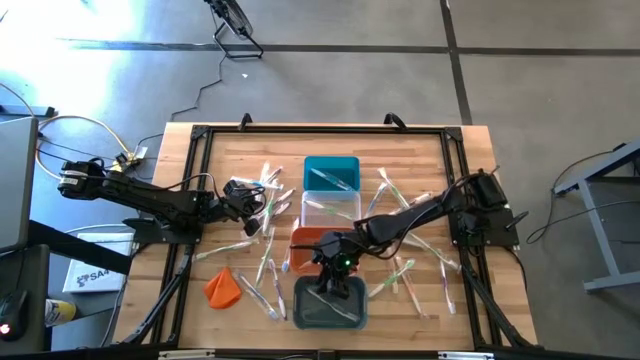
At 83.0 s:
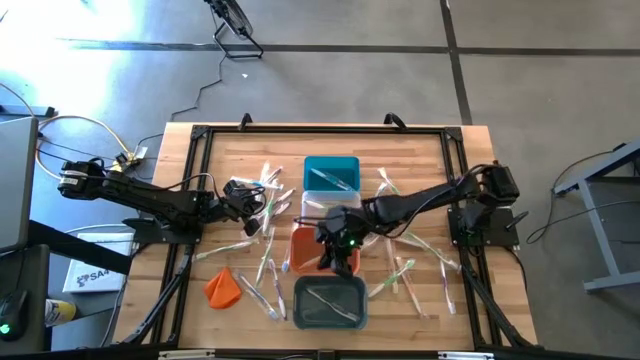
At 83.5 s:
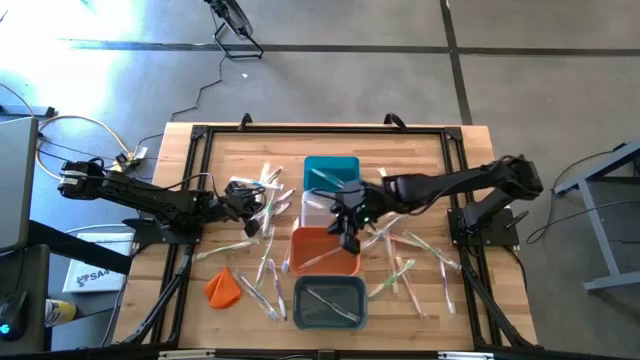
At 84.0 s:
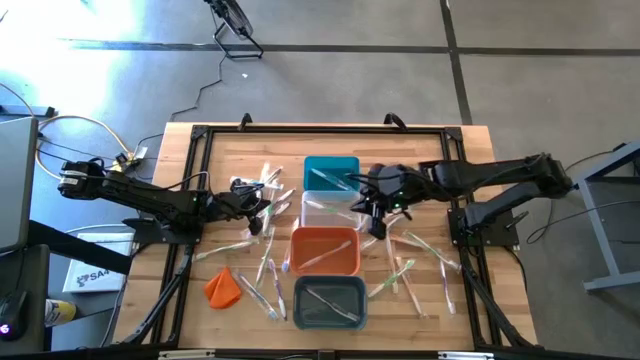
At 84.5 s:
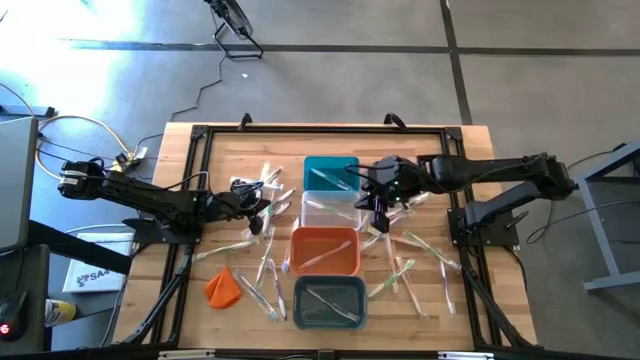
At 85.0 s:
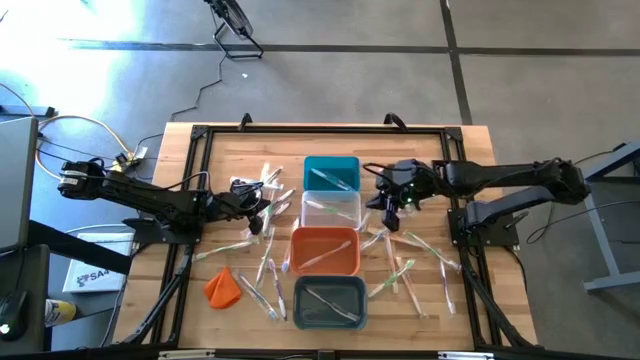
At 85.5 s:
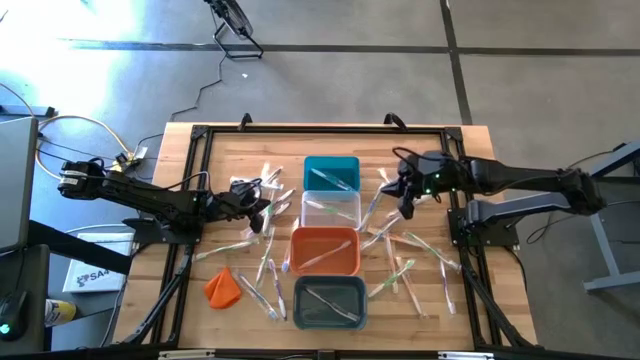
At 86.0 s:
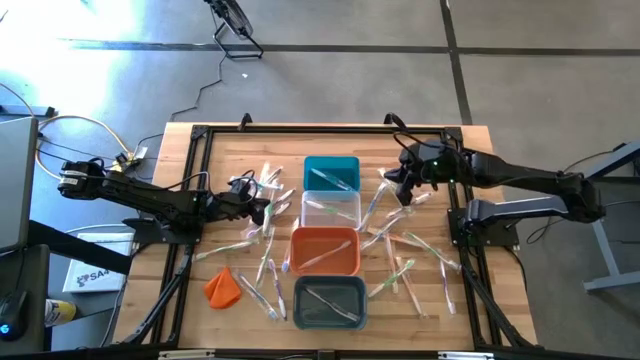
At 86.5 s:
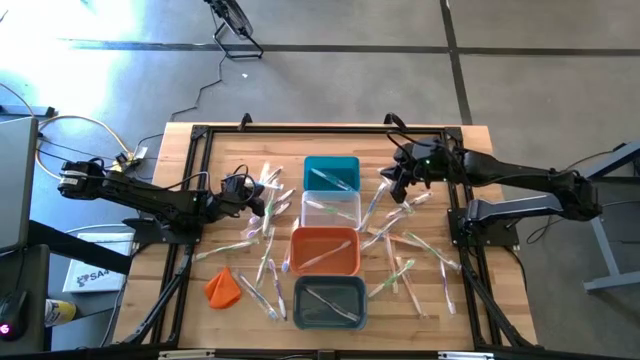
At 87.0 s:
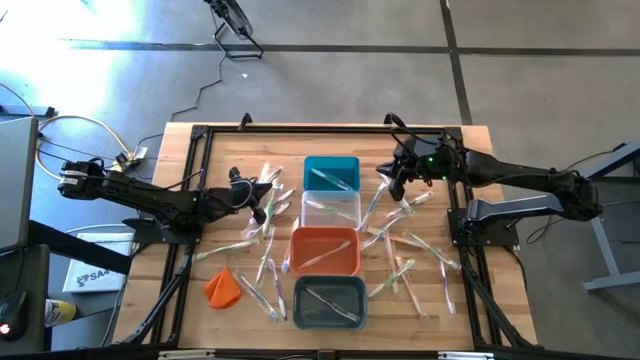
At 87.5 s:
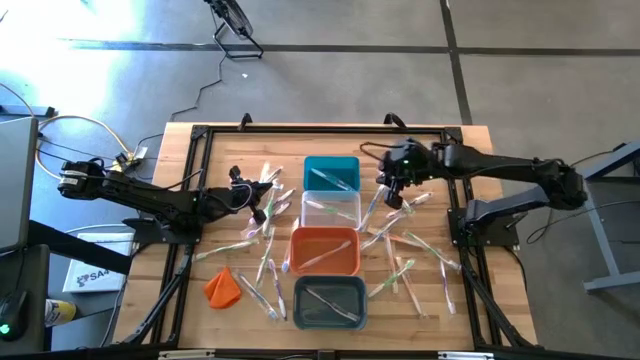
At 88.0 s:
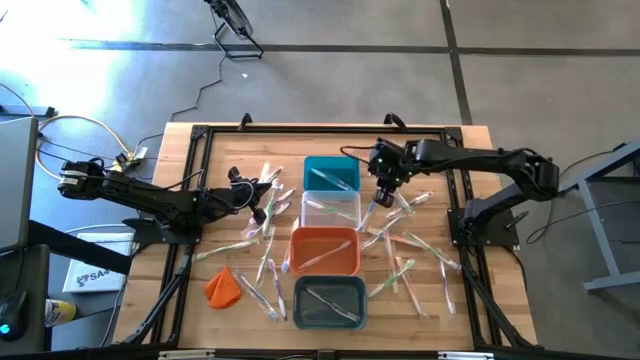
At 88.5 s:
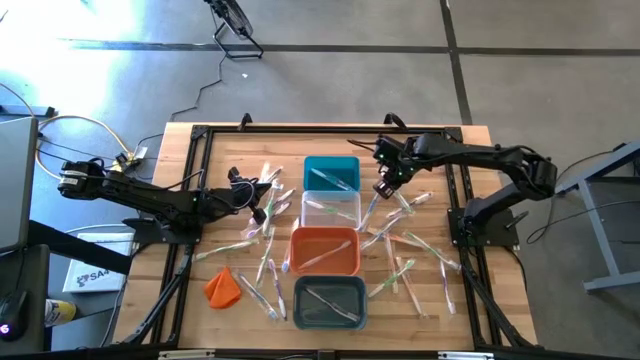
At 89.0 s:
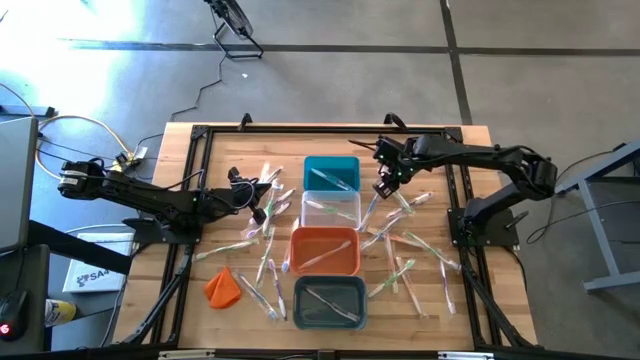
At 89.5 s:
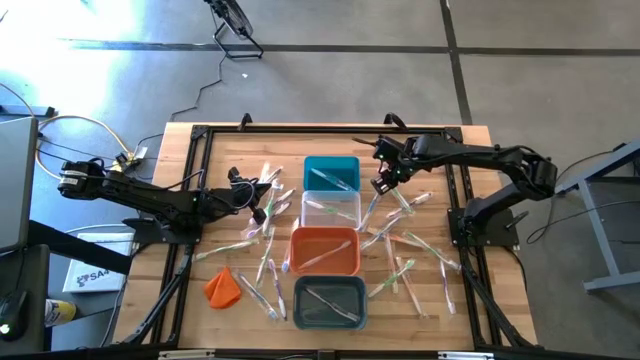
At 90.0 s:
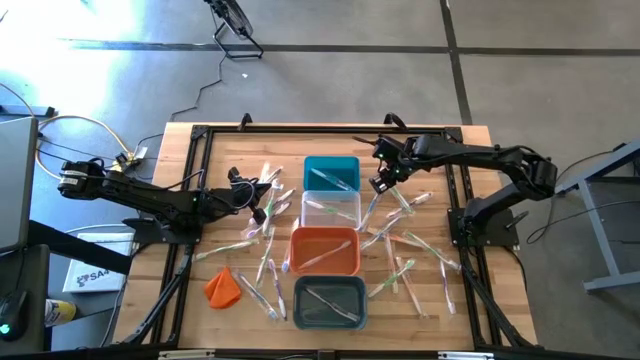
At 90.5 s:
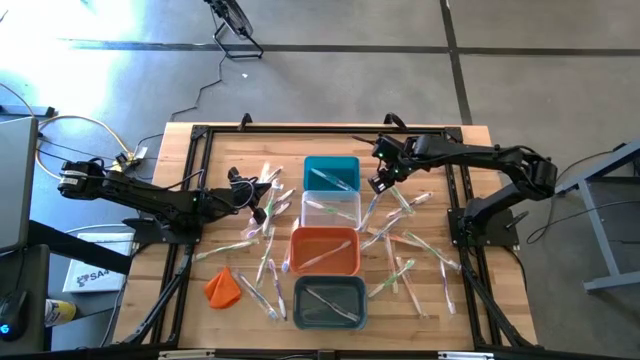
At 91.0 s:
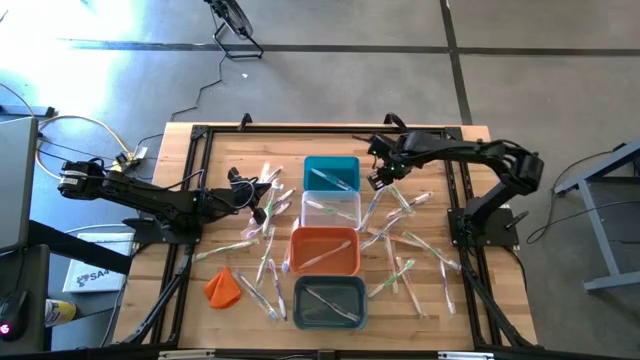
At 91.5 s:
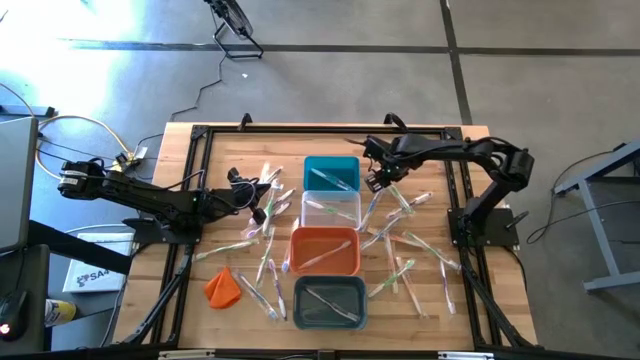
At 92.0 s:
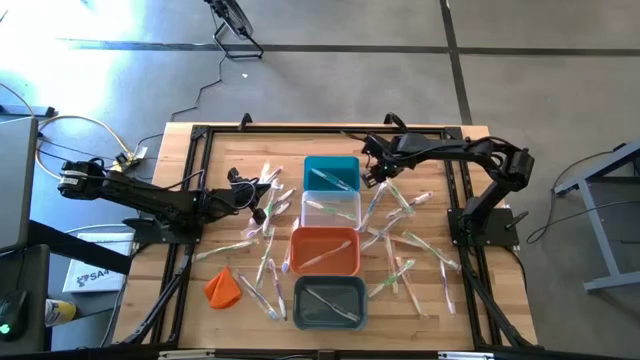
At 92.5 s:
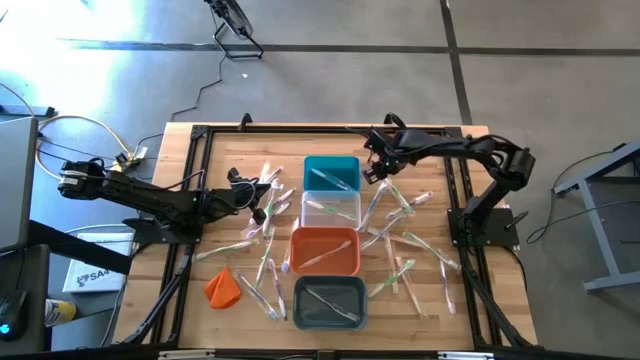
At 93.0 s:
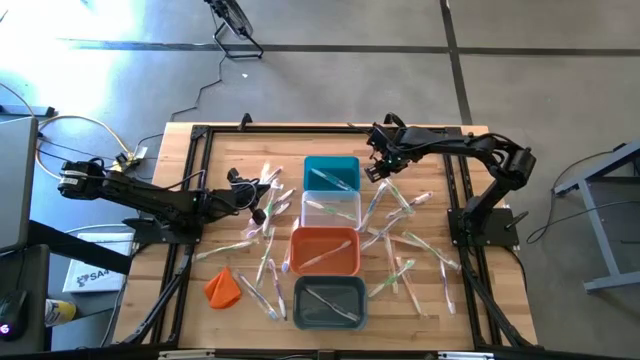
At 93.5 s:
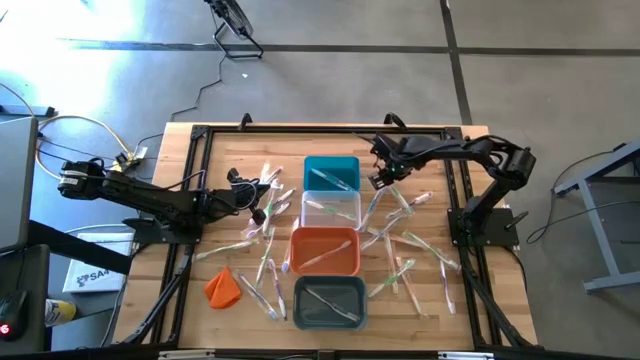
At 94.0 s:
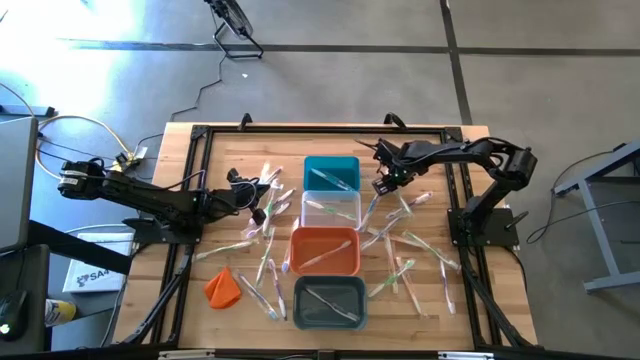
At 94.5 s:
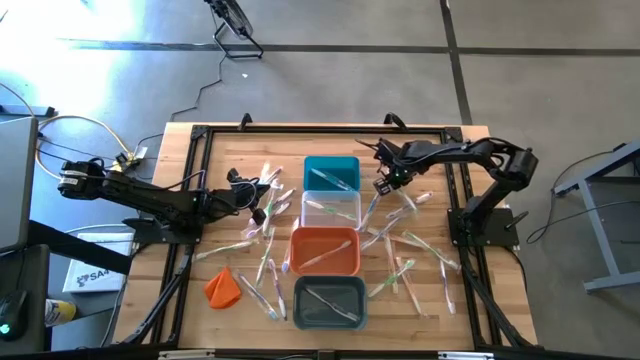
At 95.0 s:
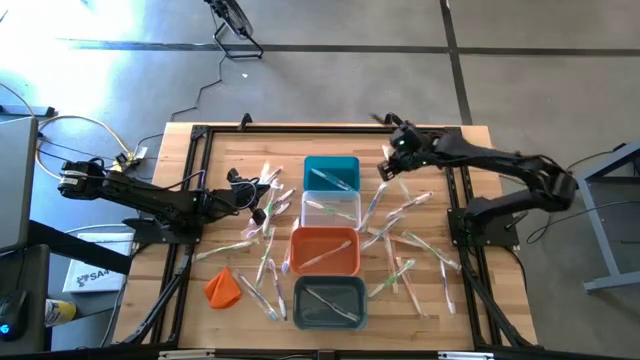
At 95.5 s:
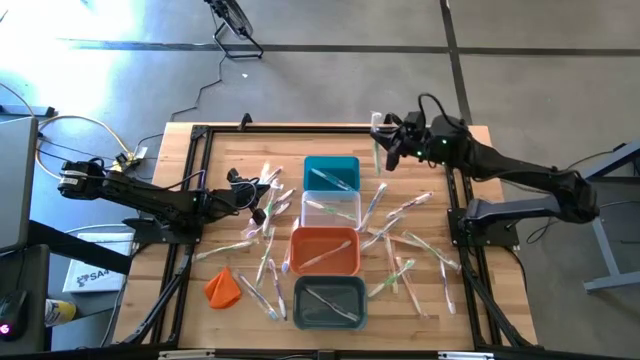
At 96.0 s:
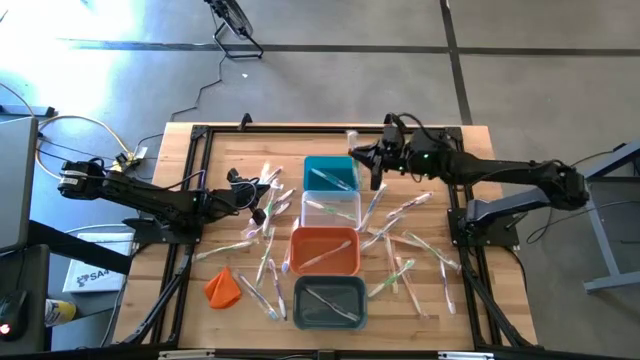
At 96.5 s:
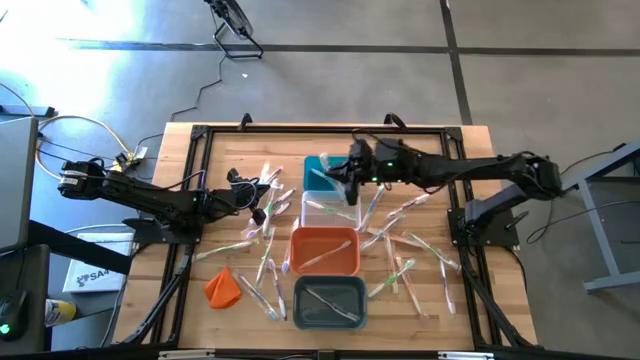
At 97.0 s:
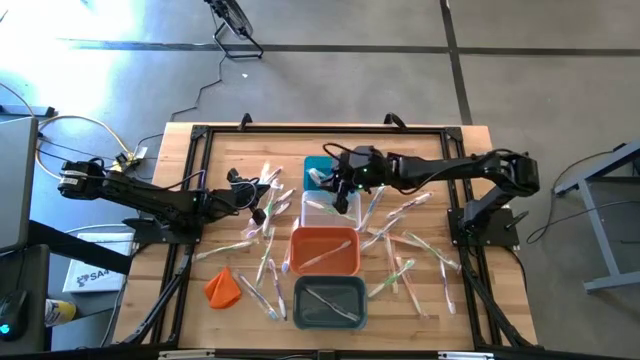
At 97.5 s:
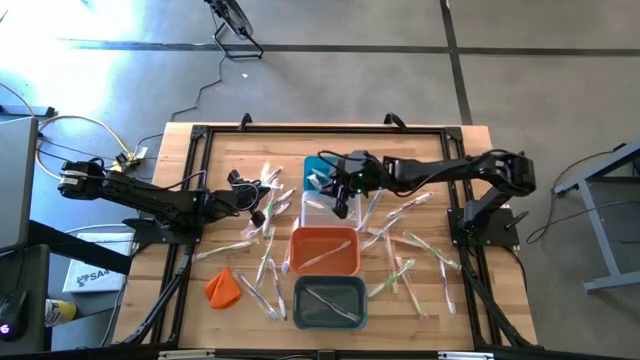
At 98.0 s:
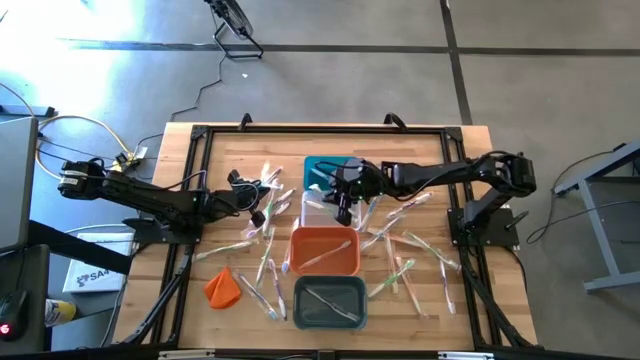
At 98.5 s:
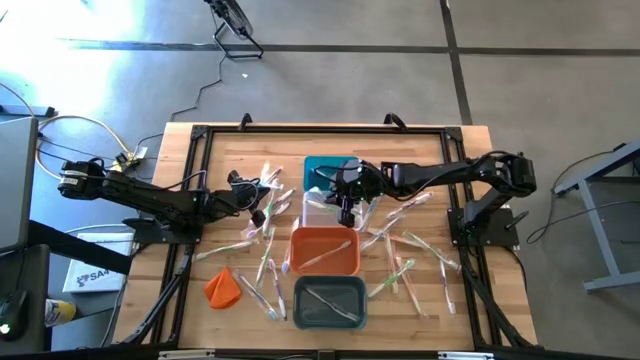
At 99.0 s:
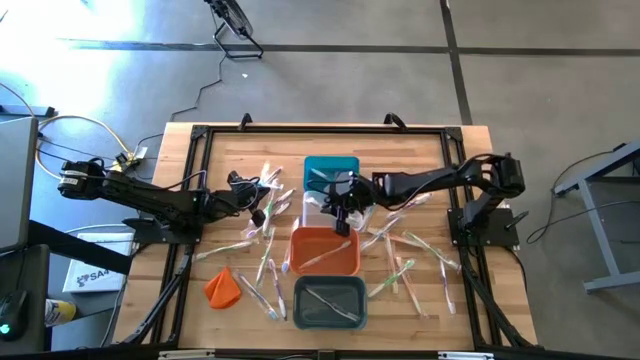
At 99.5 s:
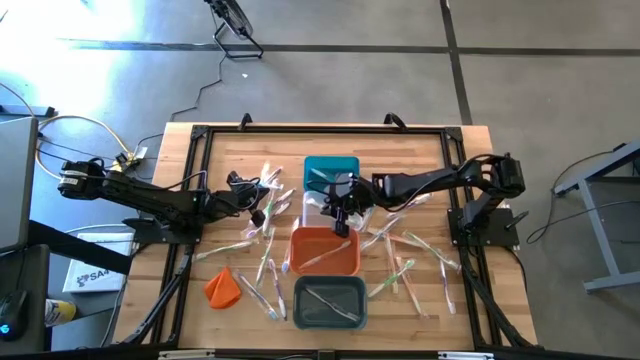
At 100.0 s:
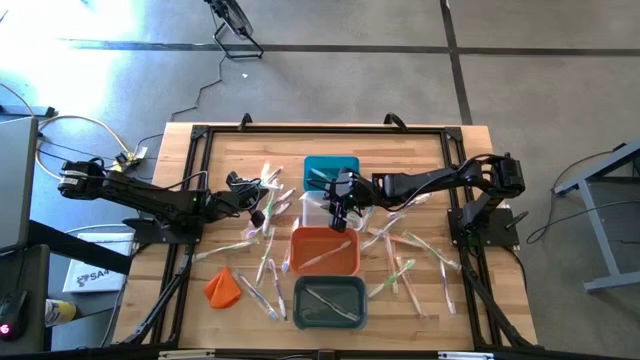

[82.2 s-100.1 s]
Task: Pick & Place Toothbrushes
Put the green toothbrush into the transparent bin

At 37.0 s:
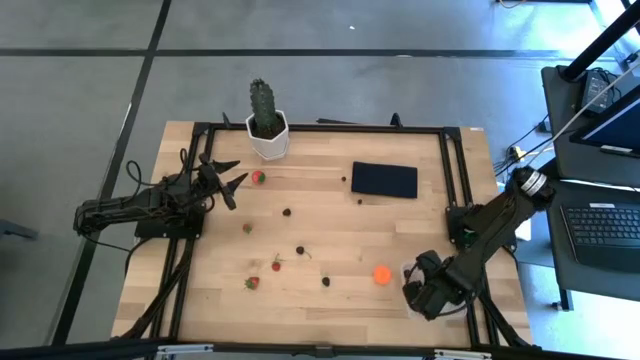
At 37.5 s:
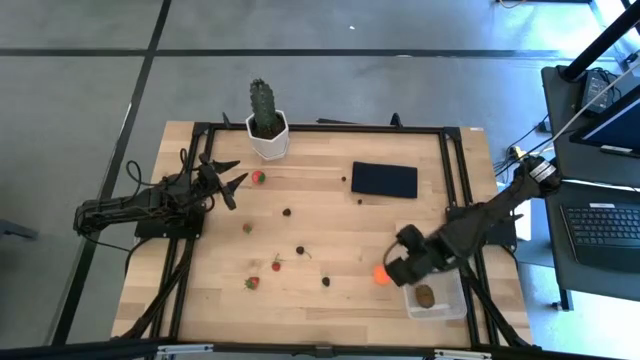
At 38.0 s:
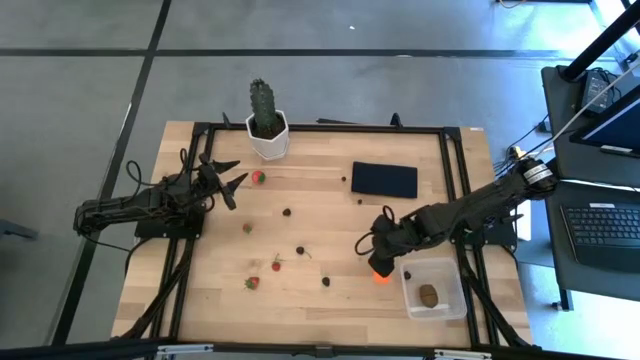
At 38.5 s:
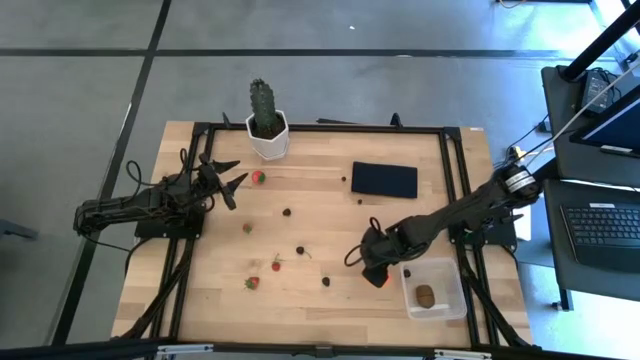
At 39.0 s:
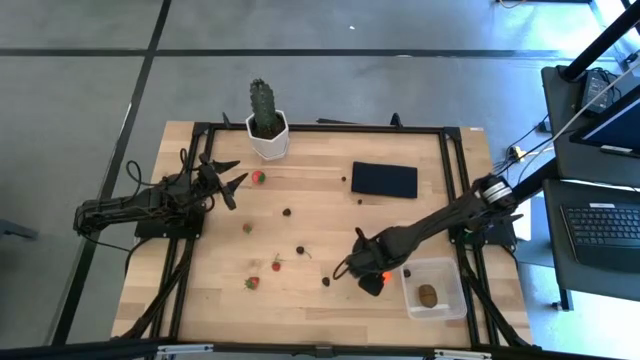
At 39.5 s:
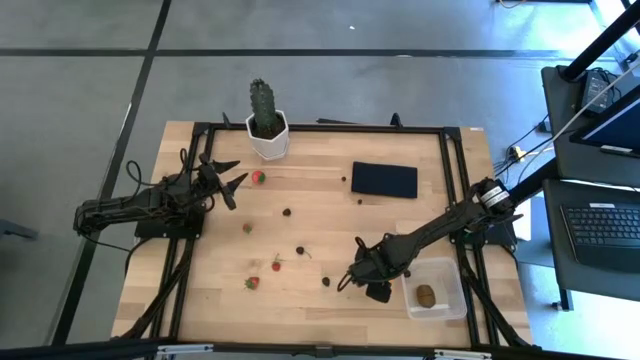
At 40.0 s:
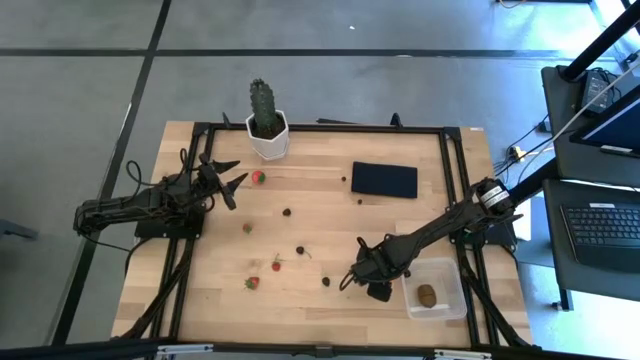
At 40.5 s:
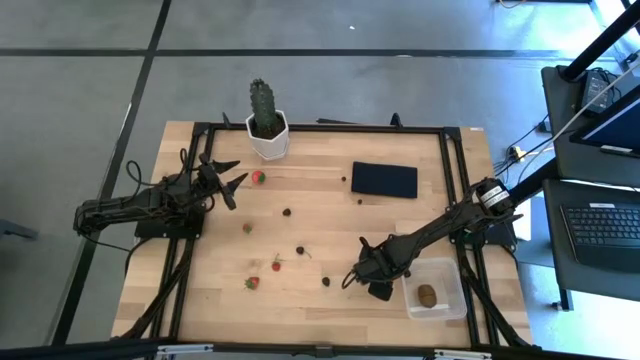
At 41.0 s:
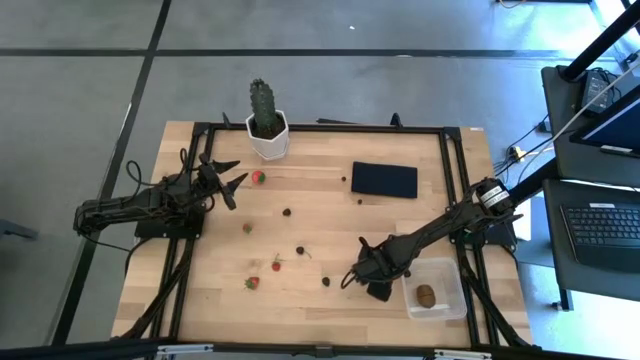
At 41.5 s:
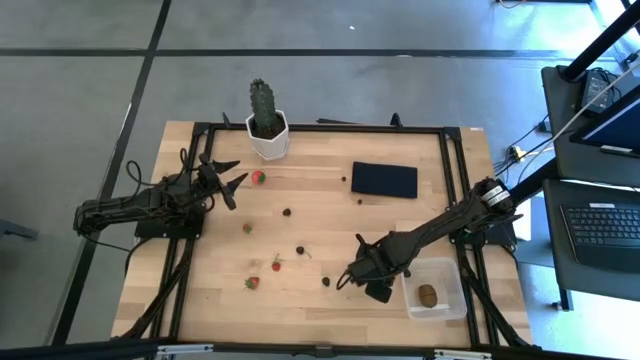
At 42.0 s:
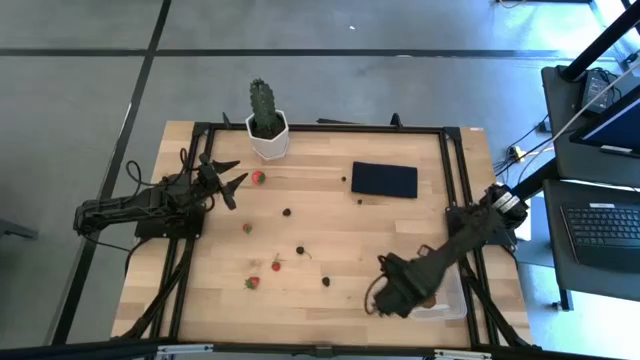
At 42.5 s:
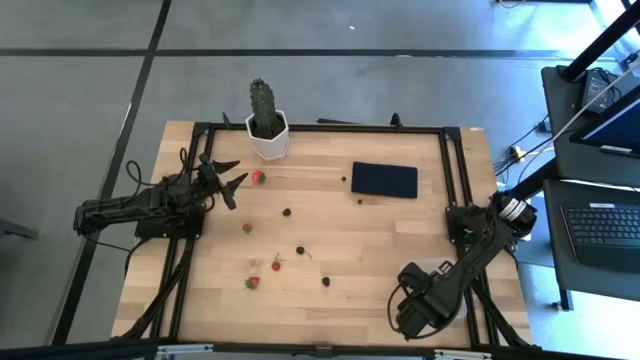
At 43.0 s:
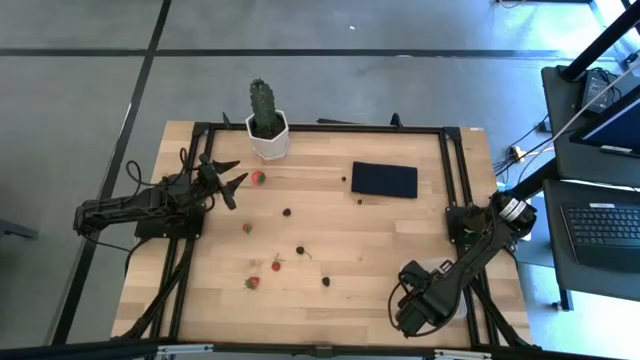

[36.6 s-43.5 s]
Task: Pick and placing Produce into tupperware
Put the tangerine into the transparent bin
